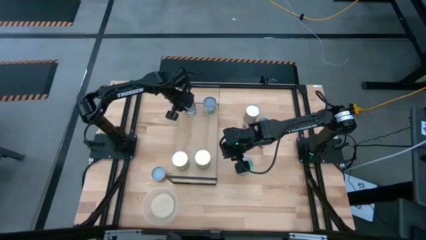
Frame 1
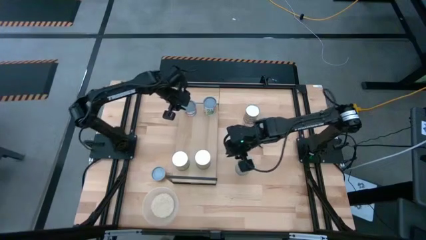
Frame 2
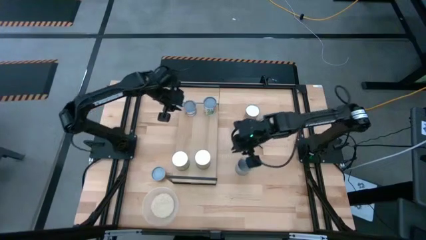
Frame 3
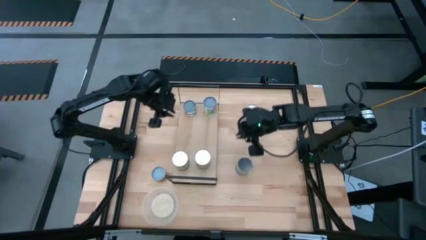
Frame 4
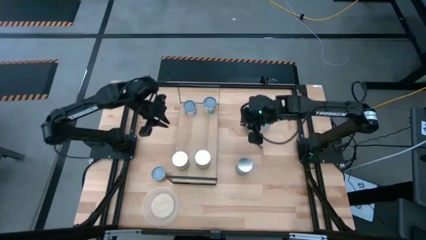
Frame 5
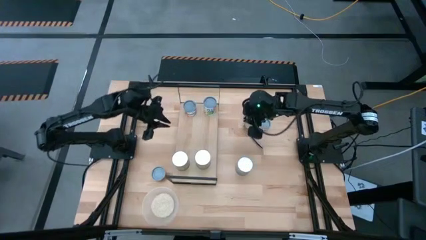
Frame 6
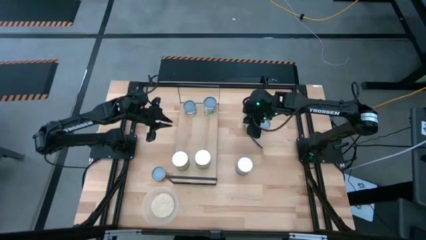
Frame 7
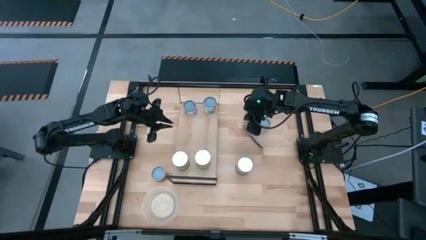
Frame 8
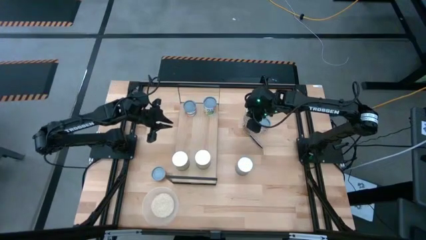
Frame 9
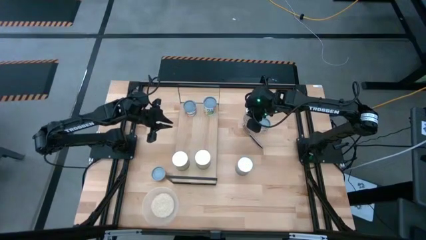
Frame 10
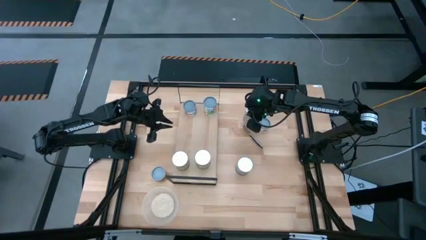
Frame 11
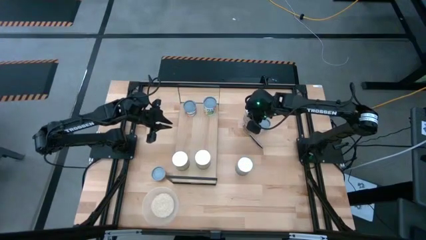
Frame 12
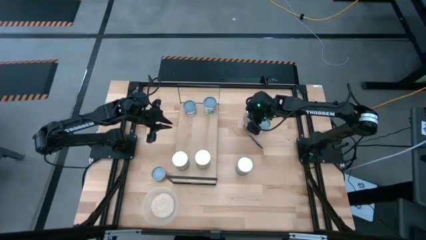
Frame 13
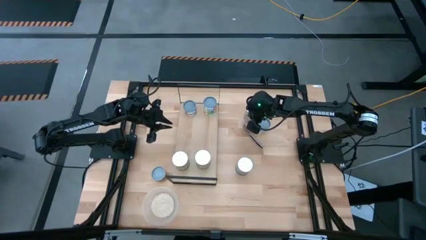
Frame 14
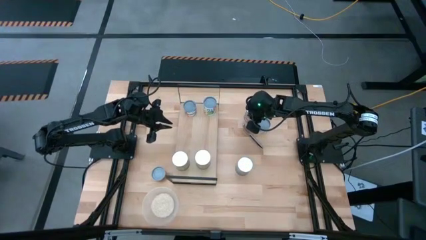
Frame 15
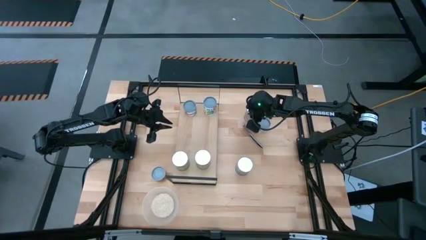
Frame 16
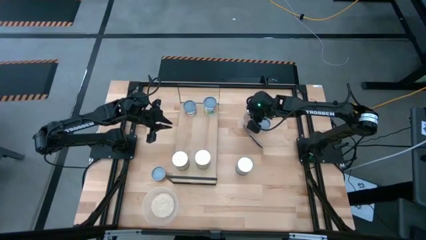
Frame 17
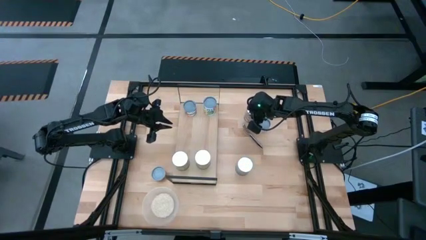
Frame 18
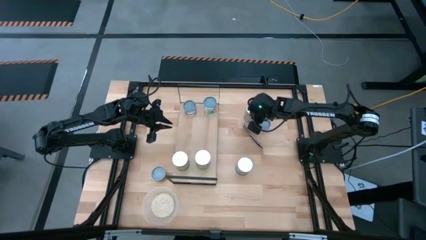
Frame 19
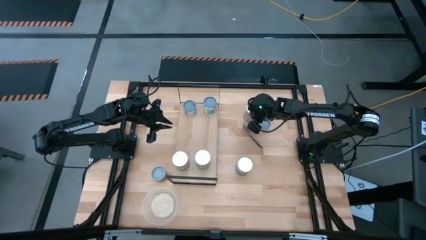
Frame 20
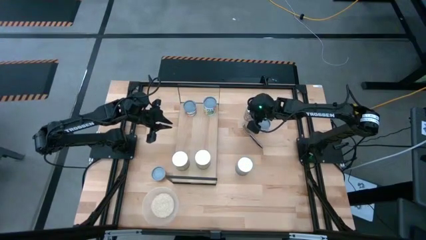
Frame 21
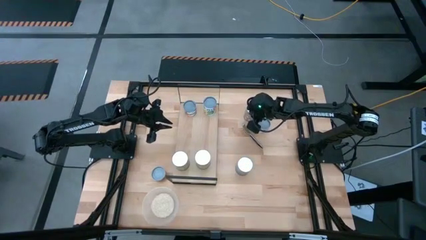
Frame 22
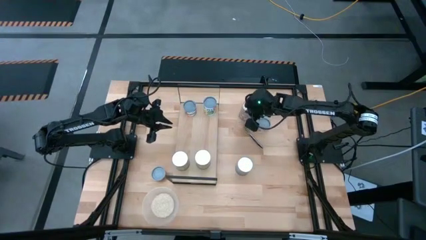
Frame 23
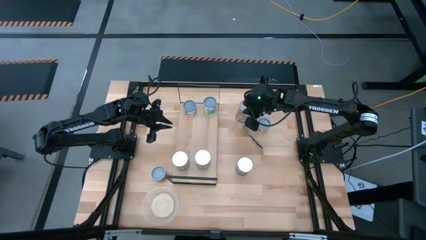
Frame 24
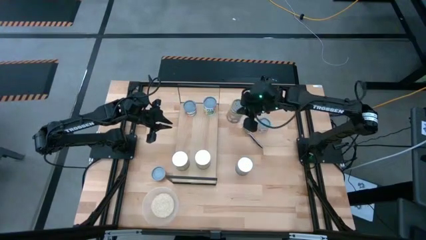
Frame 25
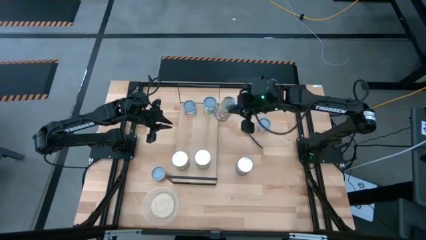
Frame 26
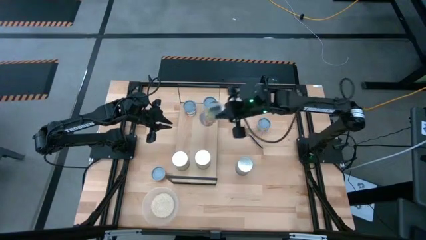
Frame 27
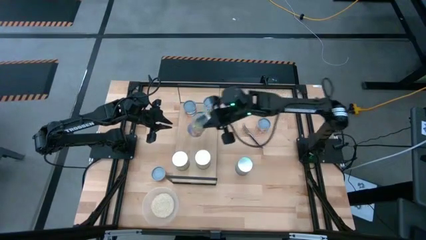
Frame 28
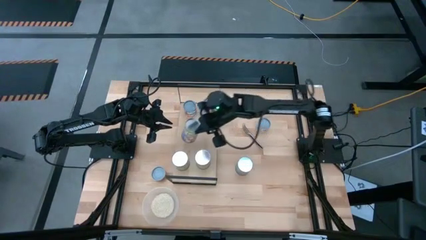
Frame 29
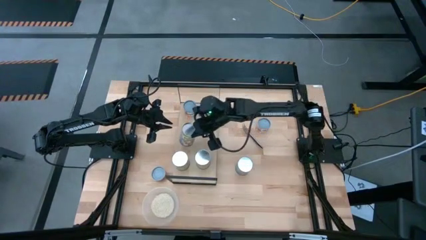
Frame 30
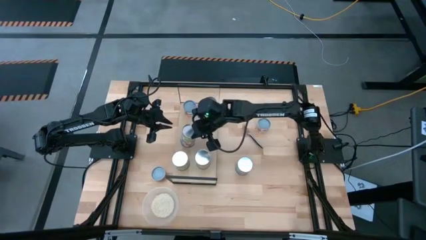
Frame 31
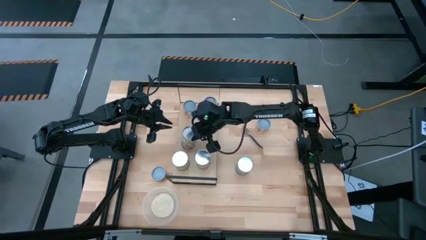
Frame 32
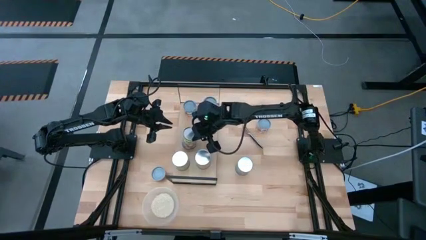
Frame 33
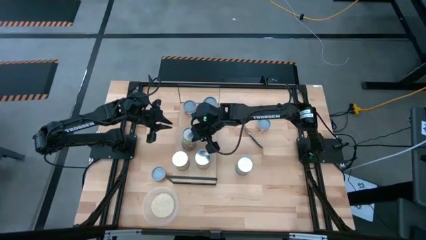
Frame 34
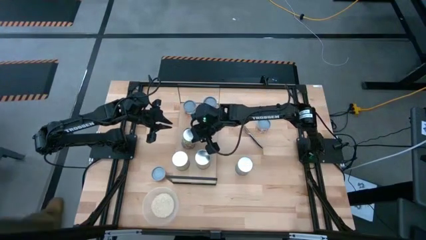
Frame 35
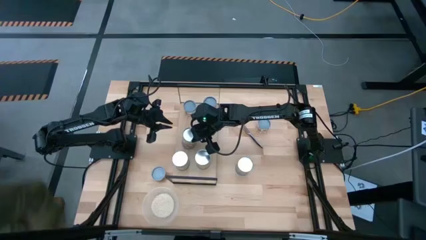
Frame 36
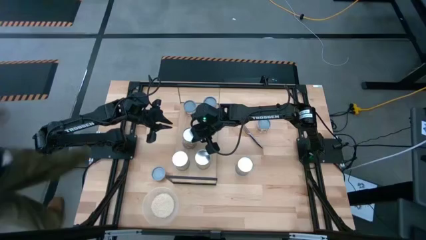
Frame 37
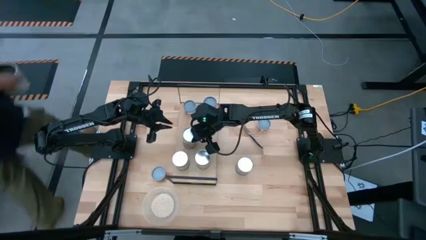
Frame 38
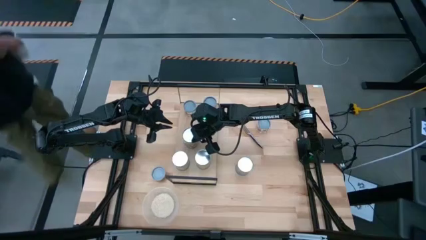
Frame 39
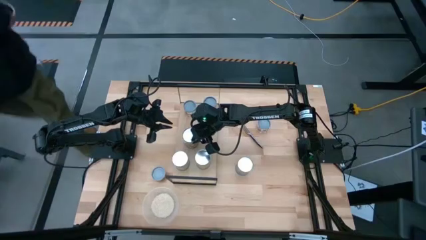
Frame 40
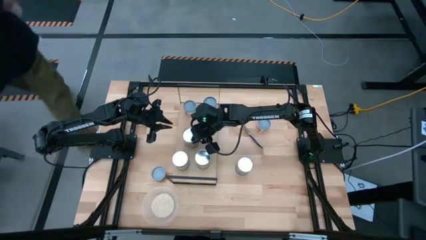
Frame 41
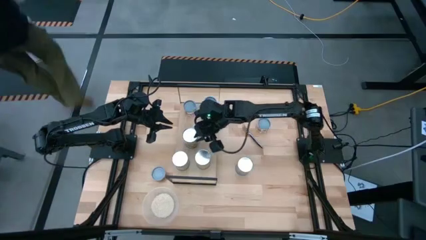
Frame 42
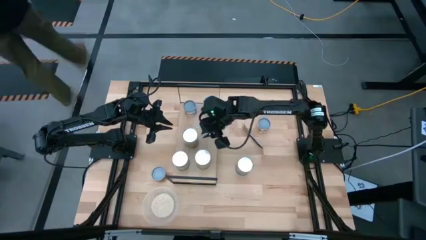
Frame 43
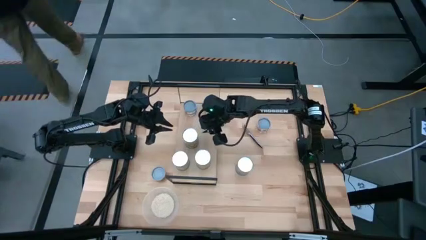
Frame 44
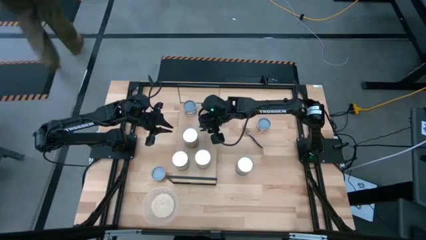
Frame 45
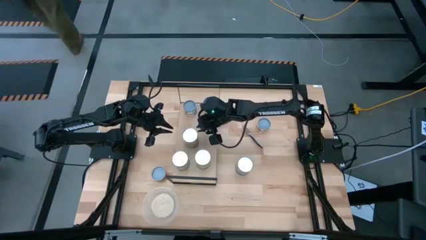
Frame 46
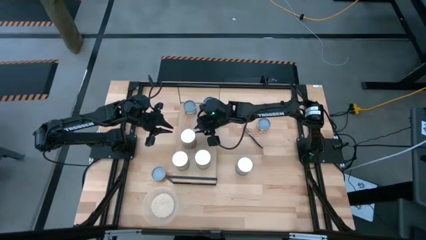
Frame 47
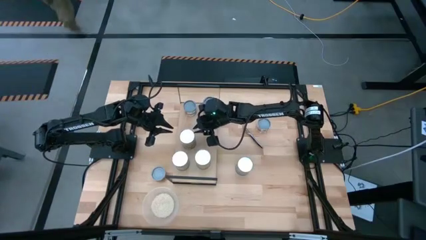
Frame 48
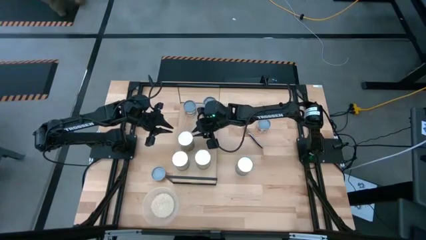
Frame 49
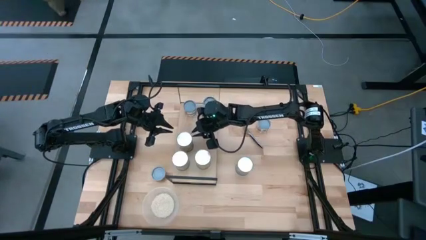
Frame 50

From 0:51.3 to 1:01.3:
Task: Pick and place cans onto a shelf
Put the canned peaches on the shelf

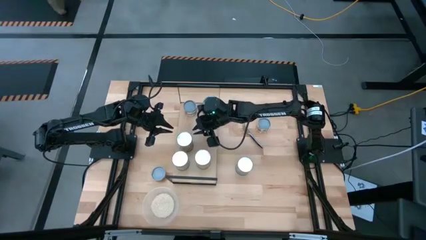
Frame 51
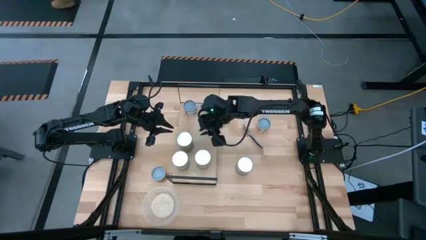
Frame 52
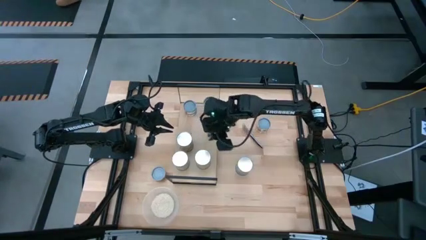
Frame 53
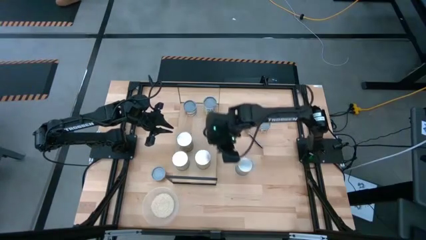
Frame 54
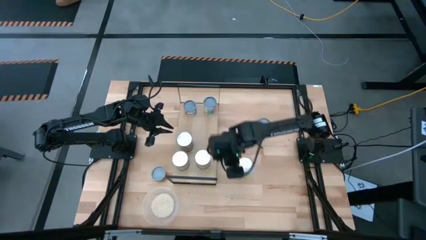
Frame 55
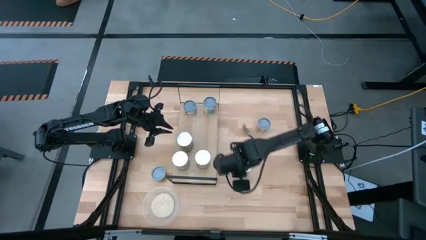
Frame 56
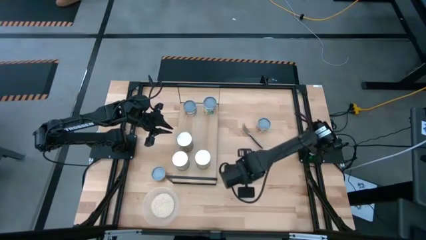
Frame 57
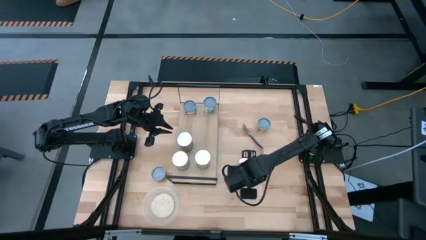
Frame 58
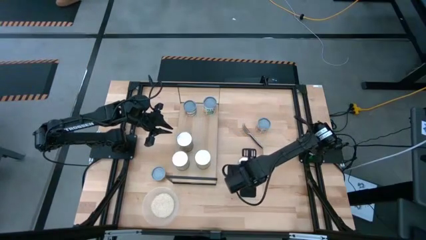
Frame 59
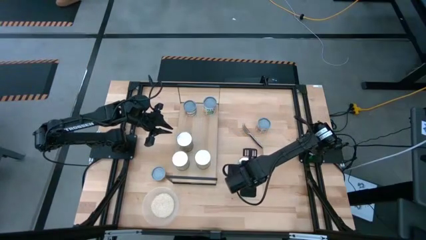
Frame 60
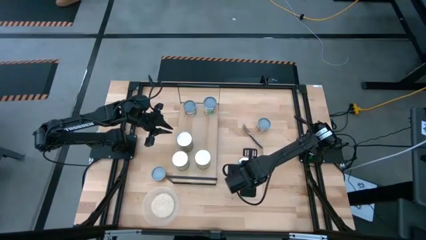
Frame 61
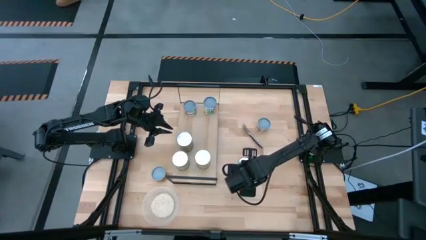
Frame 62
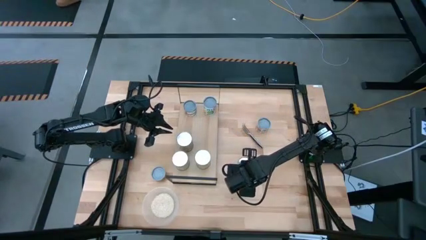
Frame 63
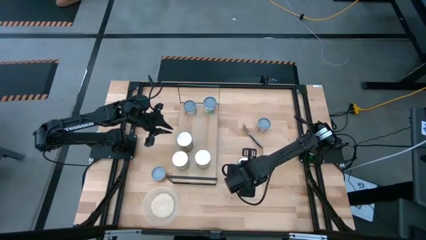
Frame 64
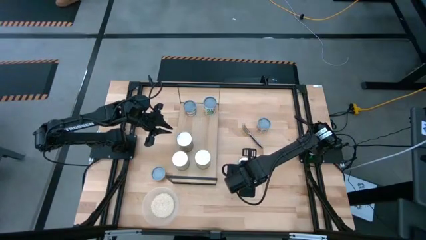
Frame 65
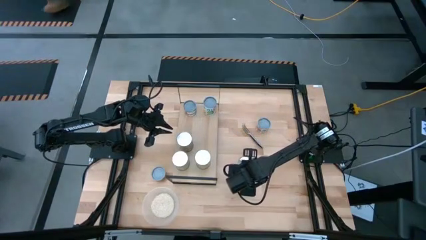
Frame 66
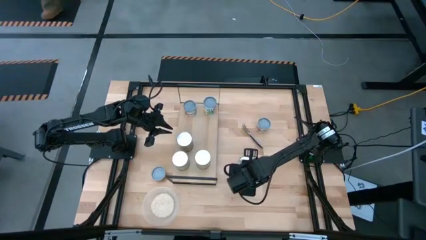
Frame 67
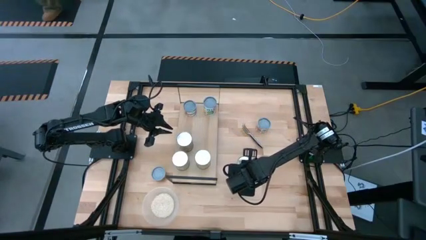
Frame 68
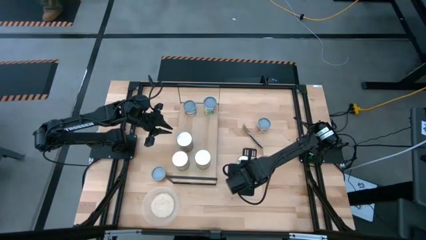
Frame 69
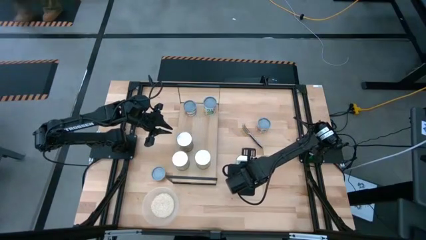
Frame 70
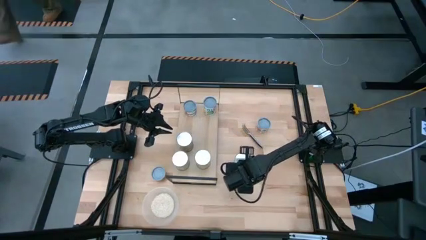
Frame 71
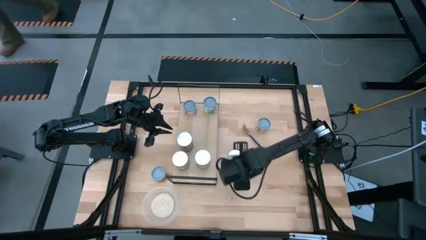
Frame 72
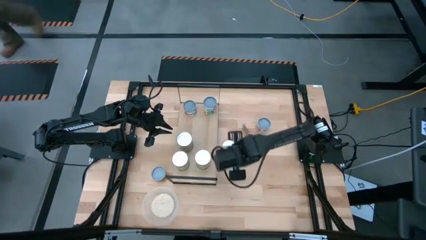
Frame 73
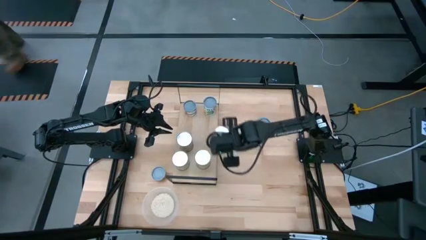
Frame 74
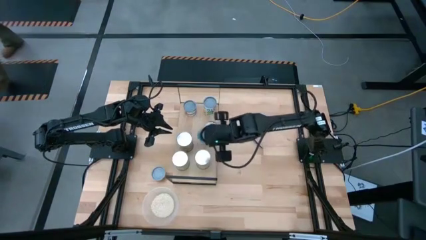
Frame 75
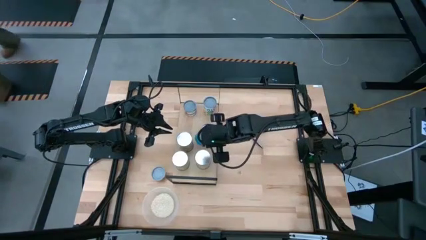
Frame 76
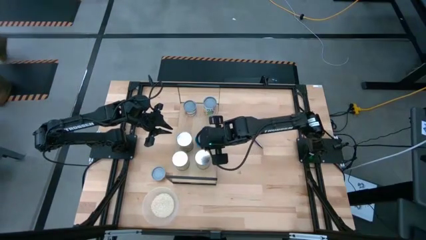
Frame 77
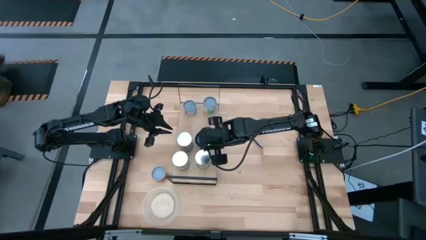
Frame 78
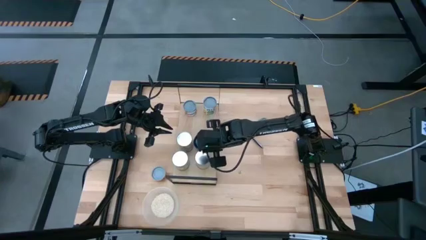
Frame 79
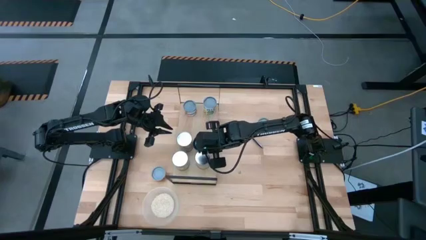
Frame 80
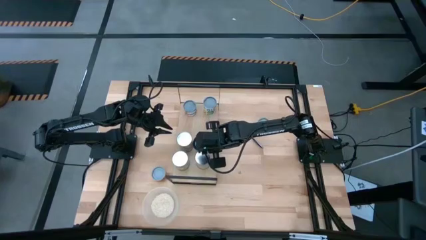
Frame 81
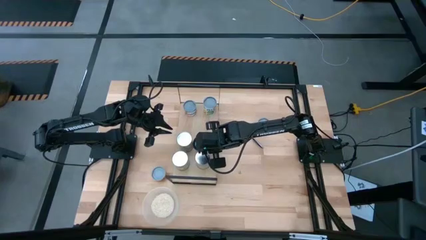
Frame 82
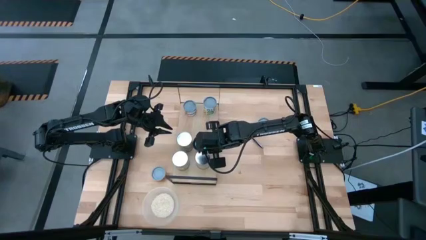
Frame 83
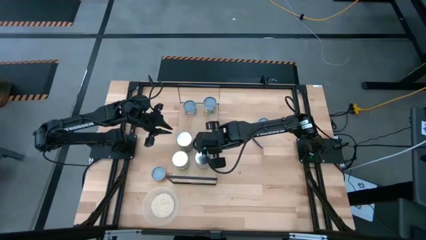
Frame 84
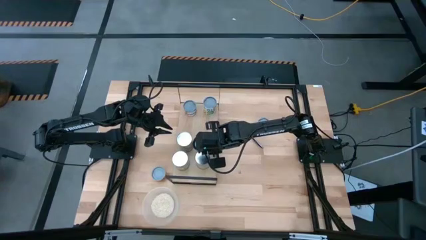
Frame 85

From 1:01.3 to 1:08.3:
Put the canned tomatoes on the shelf
